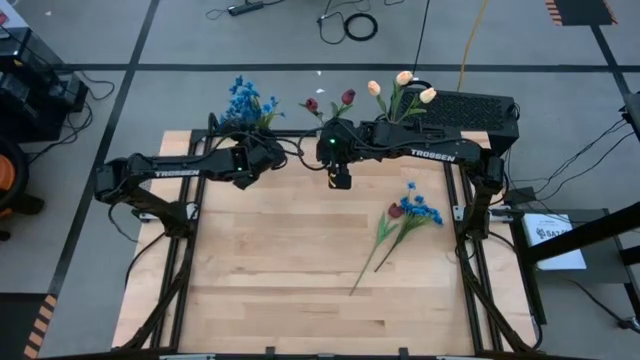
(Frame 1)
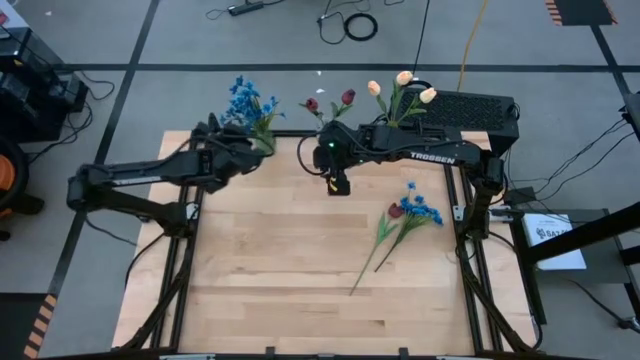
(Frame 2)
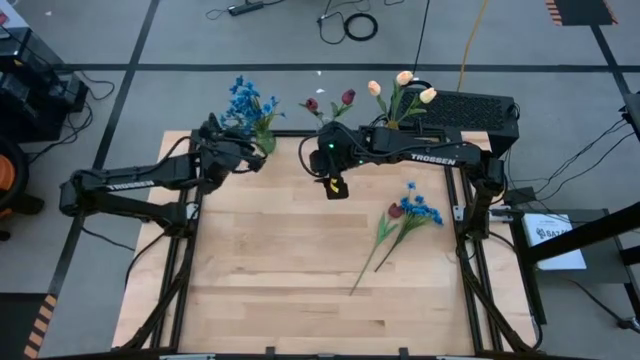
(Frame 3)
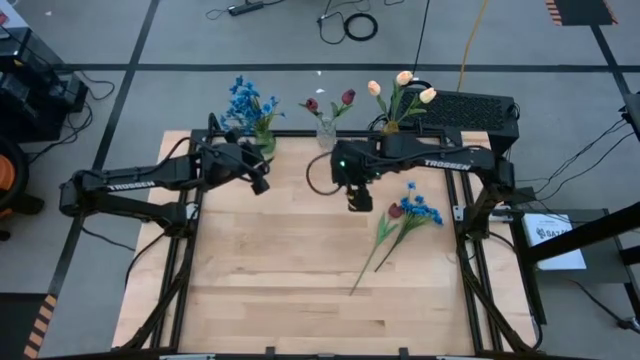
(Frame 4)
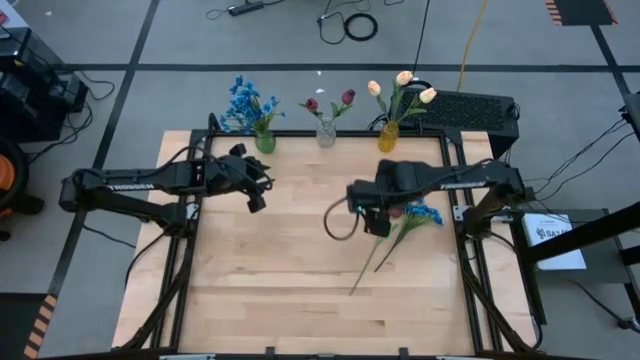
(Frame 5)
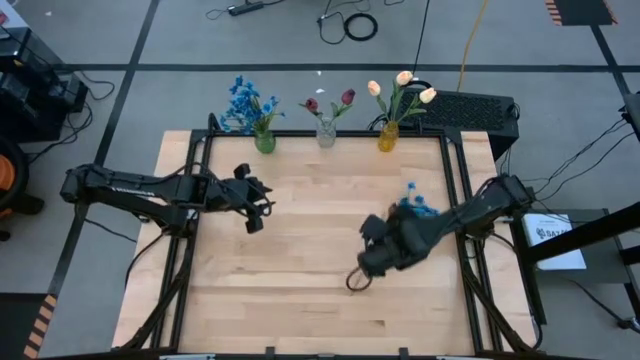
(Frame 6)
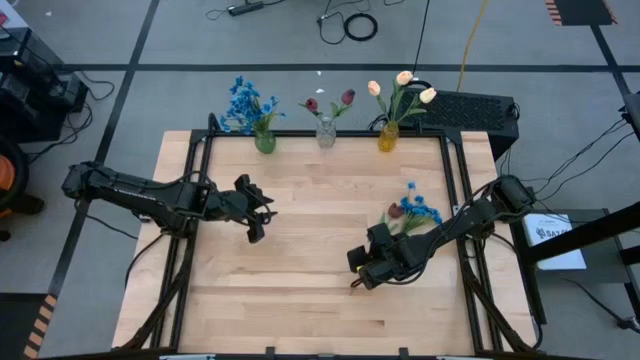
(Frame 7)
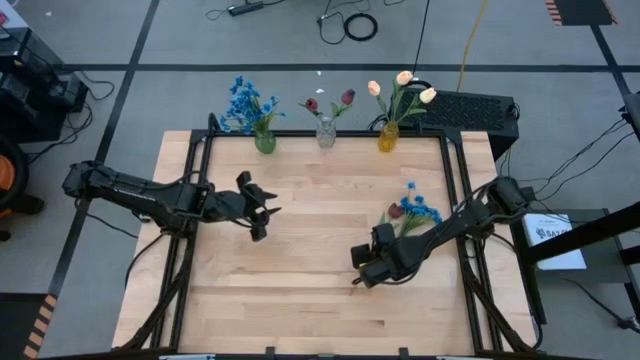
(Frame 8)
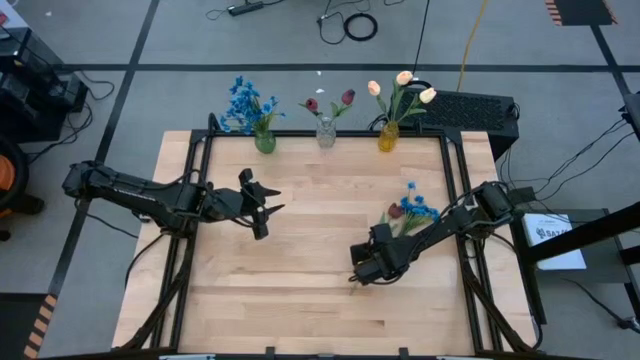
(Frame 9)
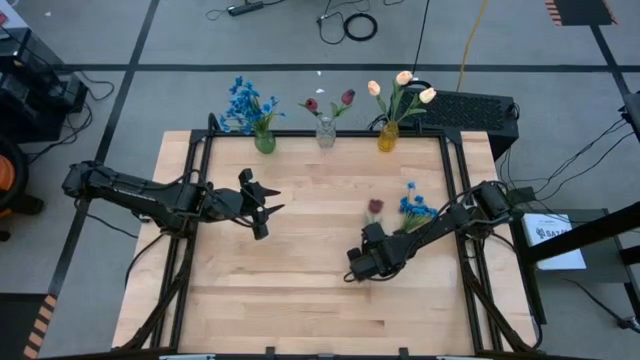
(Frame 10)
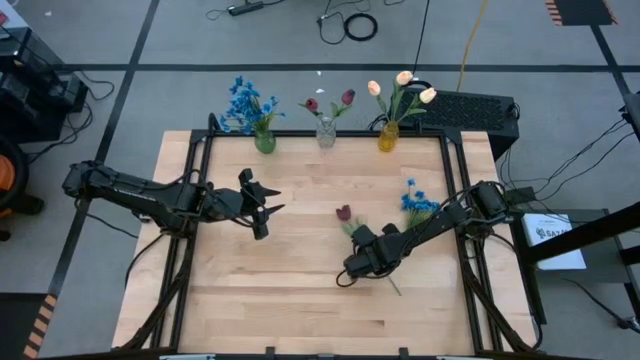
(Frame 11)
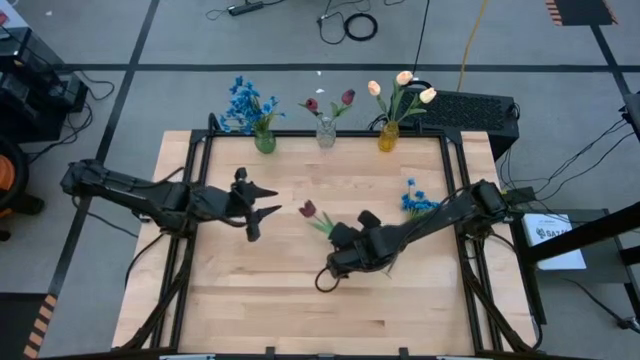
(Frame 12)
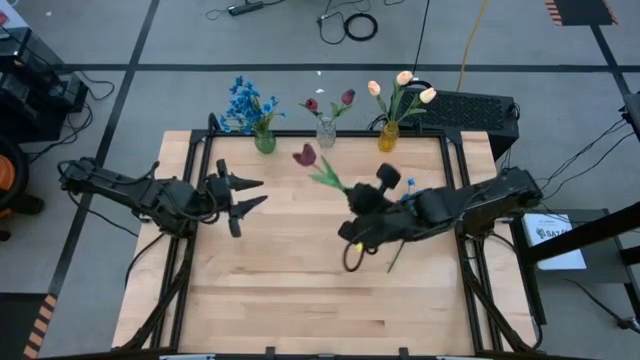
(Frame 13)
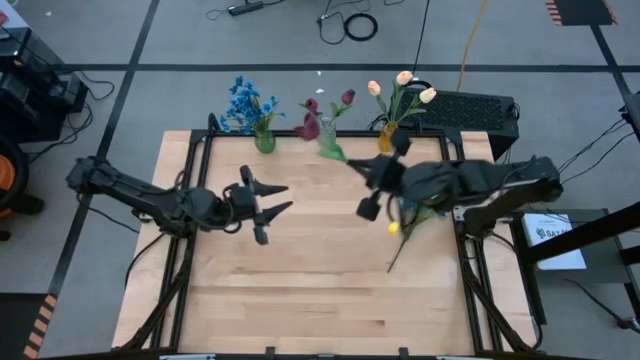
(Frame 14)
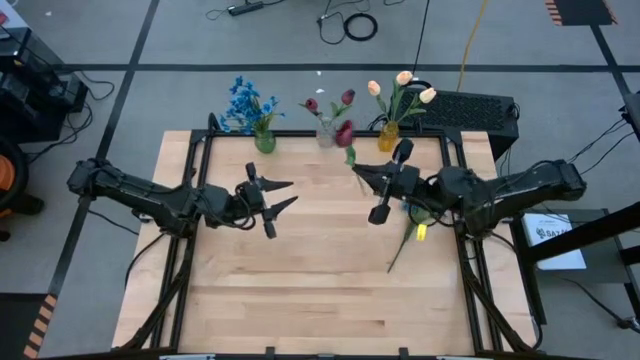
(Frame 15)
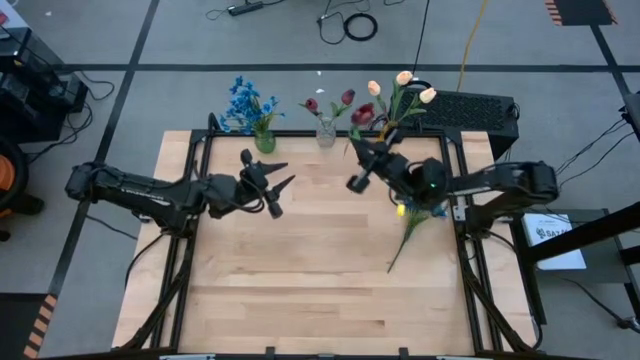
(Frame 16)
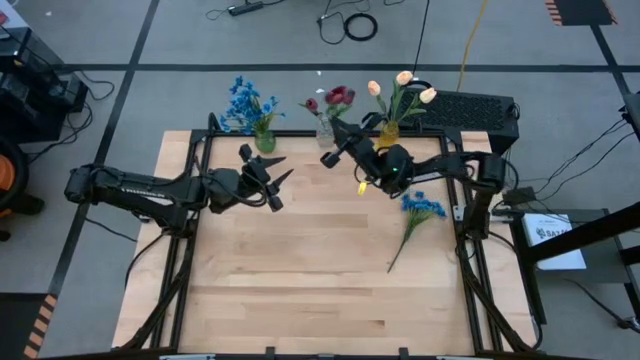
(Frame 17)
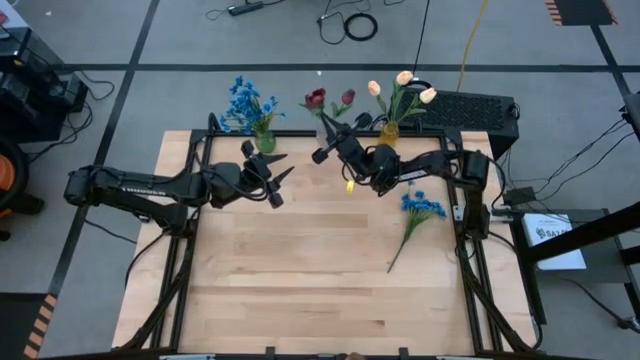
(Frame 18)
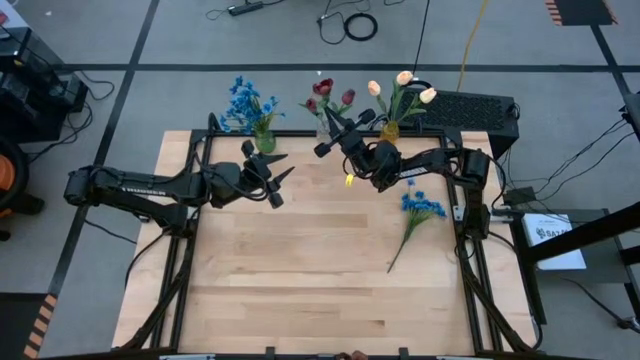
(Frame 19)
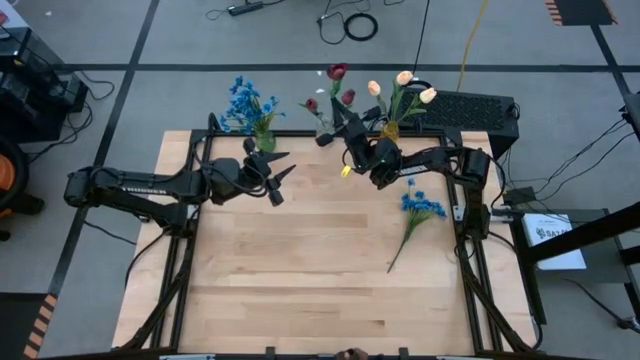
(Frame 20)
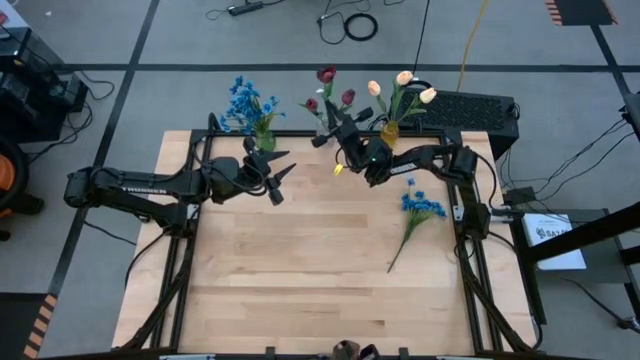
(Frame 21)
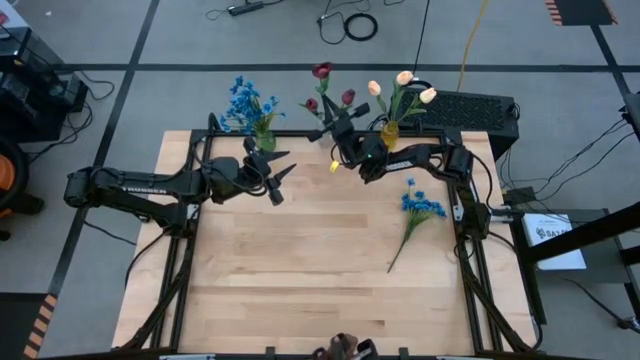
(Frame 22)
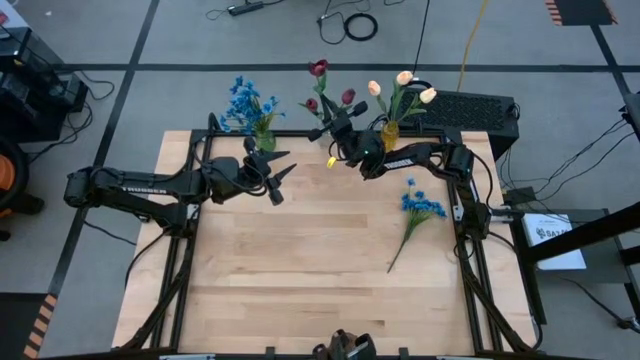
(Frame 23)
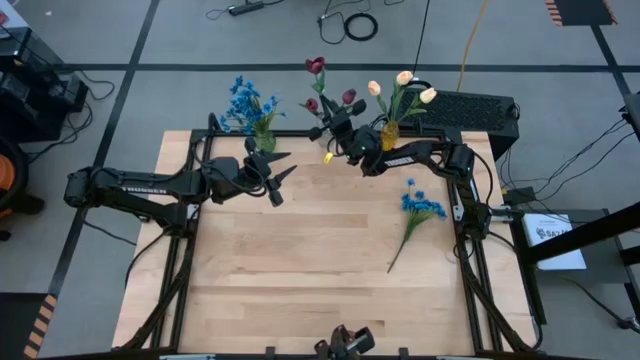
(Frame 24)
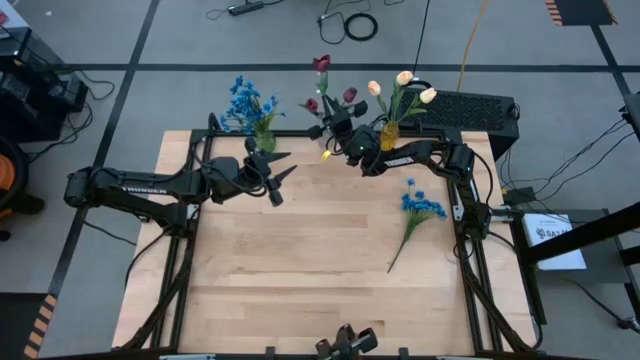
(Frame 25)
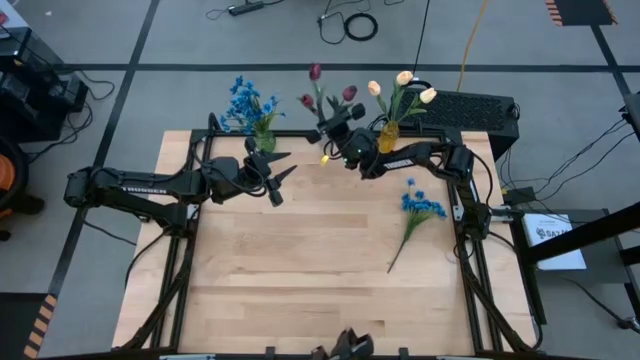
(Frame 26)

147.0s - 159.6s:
Task: Sort flowers into vase by color
Put the red tulip into the transparent vase

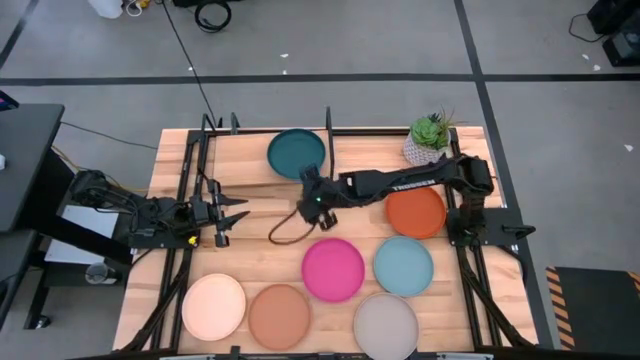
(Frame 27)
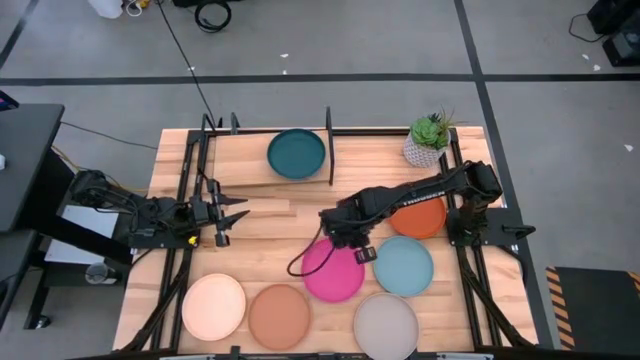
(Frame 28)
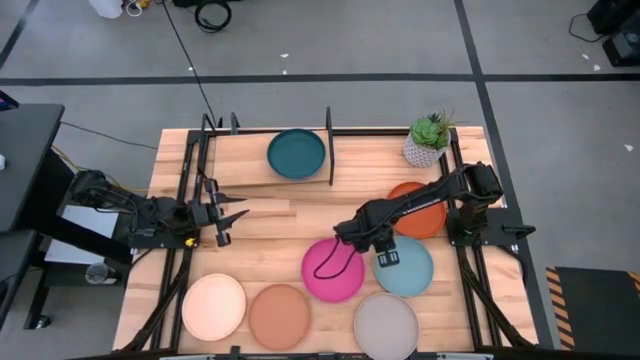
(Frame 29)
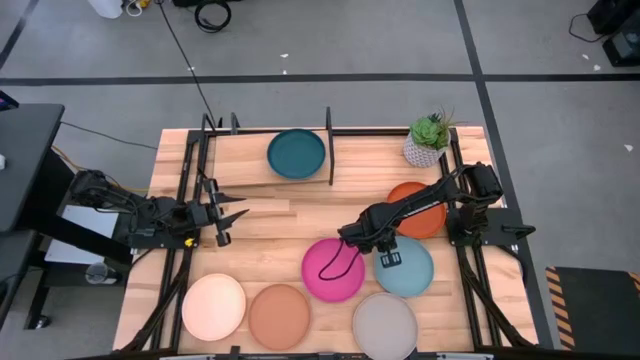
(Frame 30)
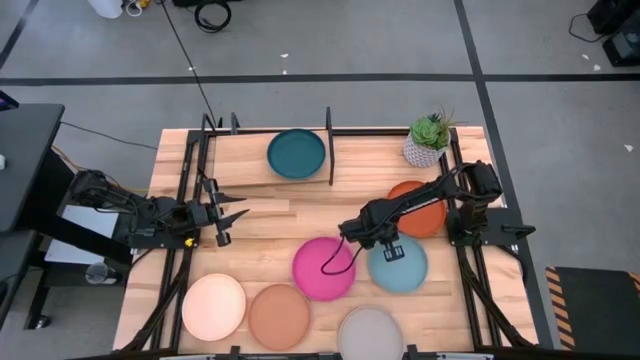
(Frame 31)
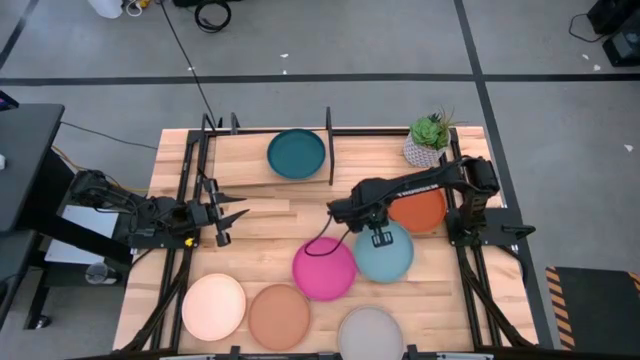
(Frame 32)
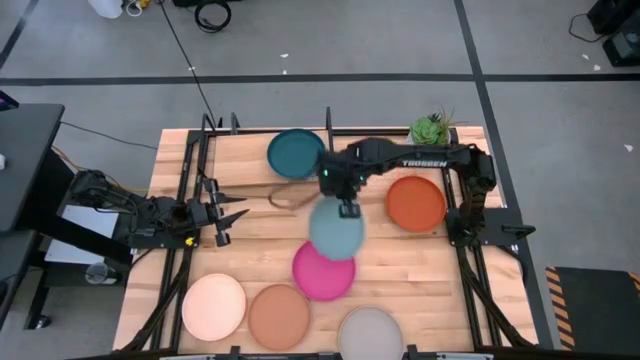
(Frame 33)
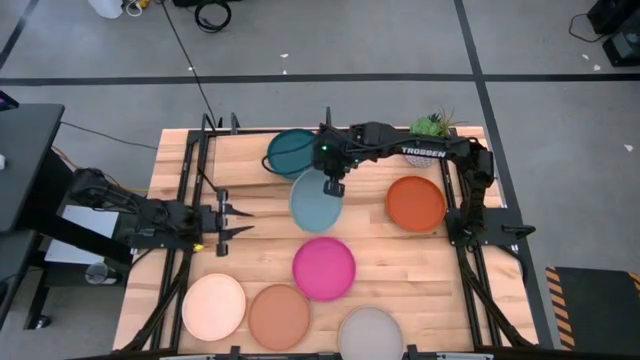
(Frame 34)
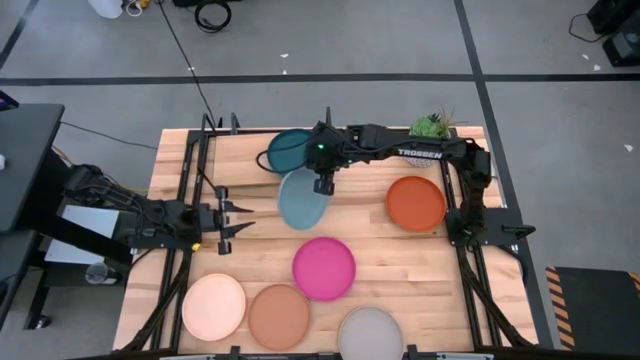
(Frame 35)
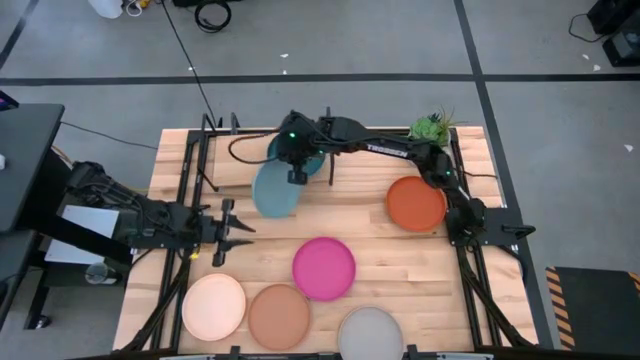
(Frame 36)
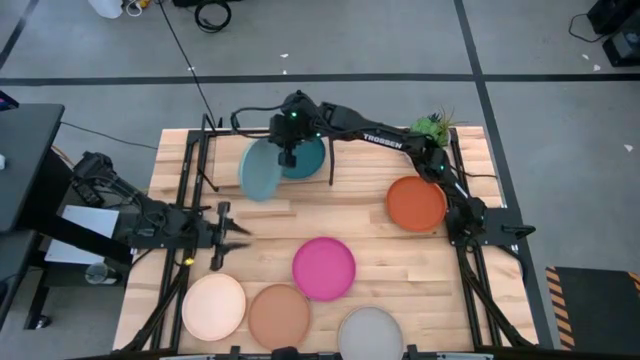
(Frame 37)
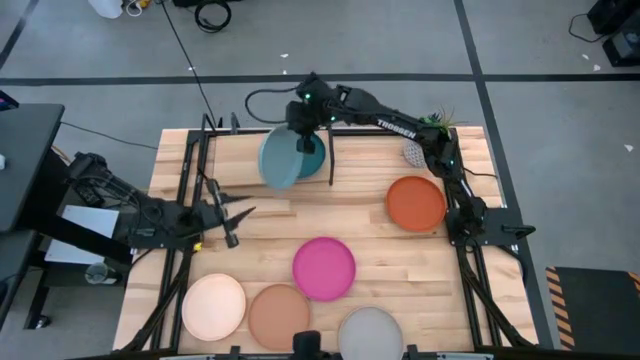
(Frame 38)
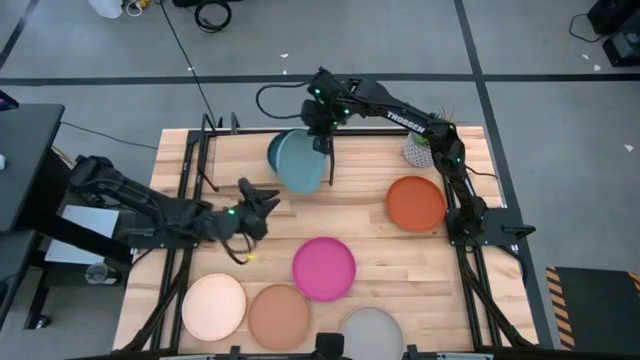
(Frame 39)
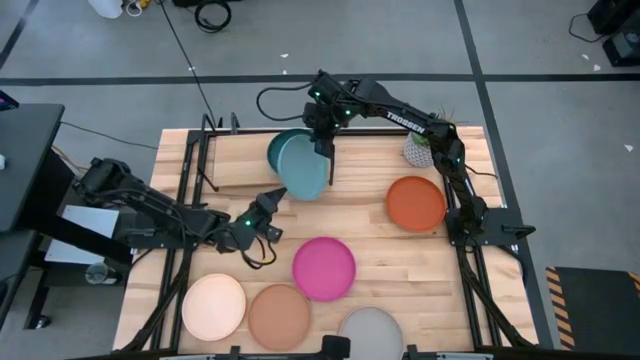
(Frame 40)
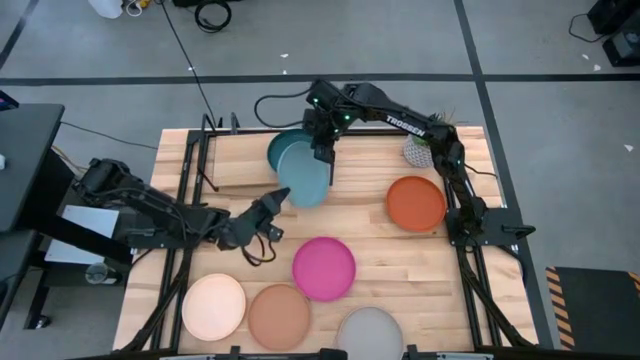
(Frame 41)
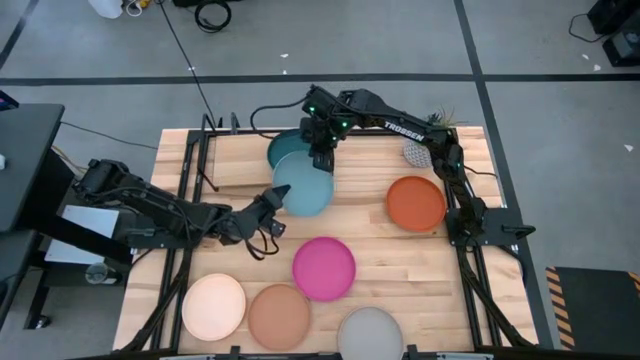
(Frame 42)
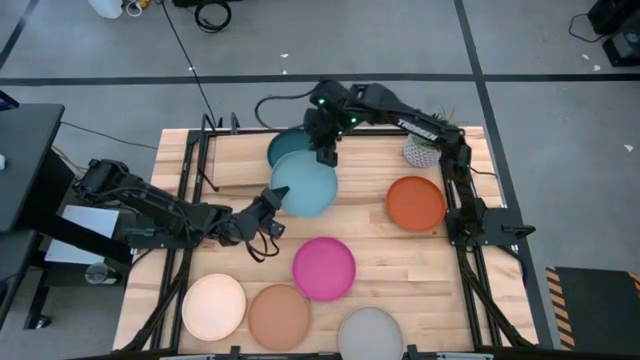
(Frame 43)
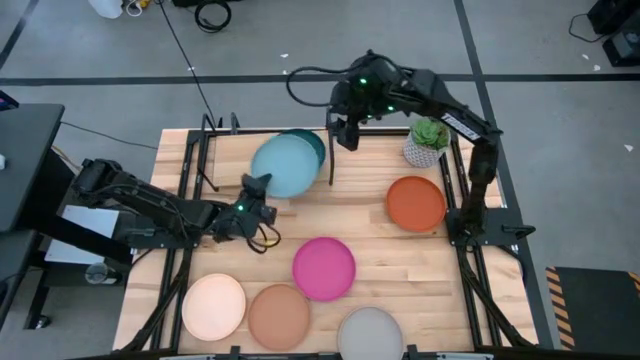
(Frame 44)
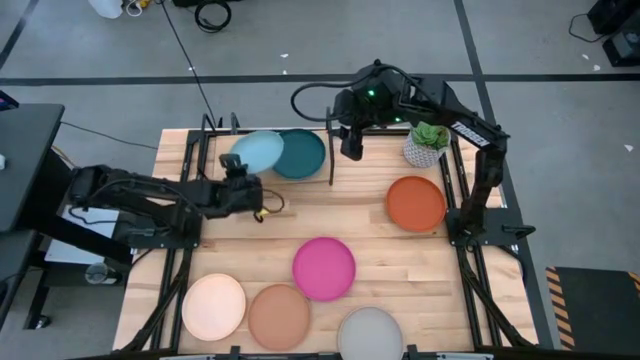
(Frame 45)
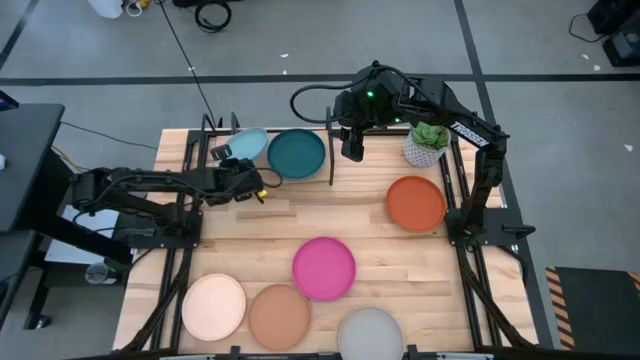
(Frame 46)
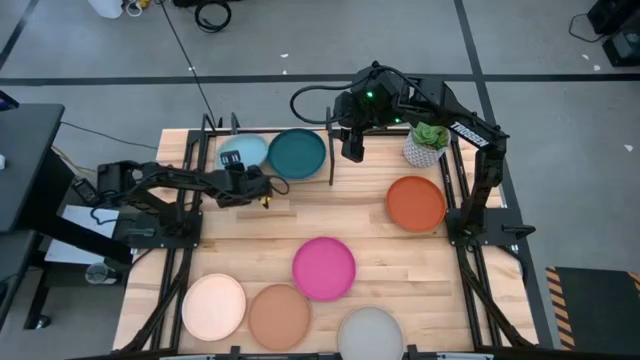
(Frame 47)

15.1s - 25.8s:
Task: Place and stack plates onto a shelf
Put the light blue plate on the shelf
